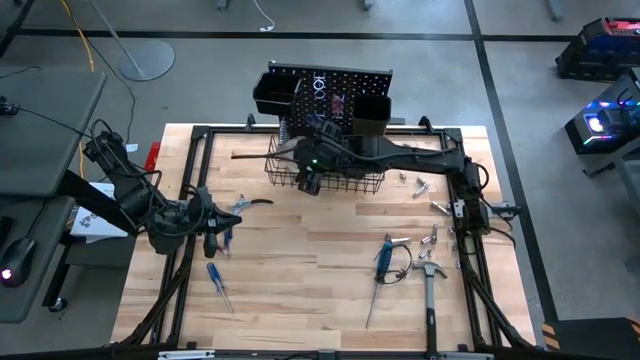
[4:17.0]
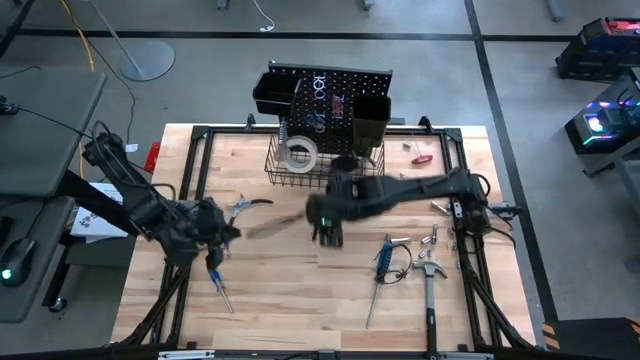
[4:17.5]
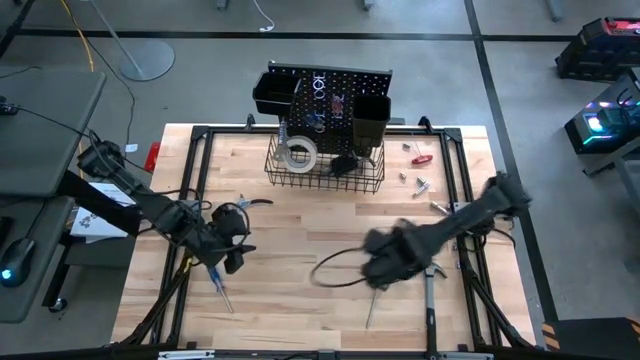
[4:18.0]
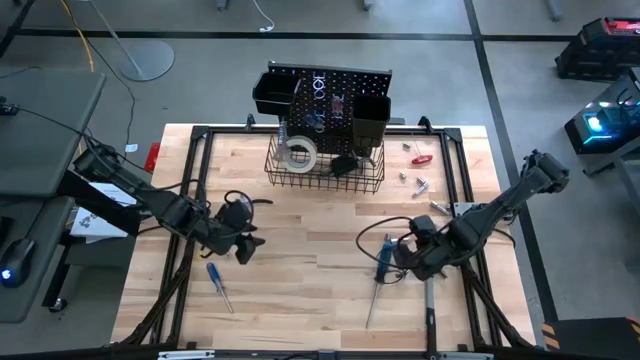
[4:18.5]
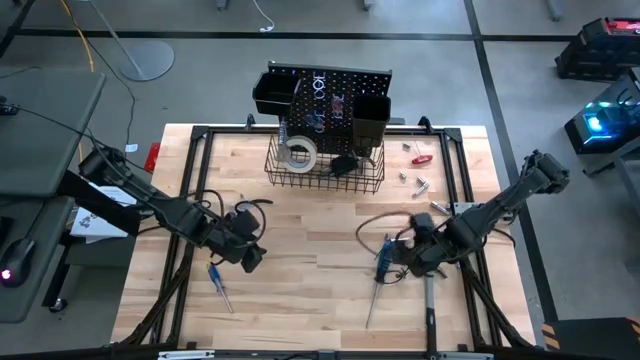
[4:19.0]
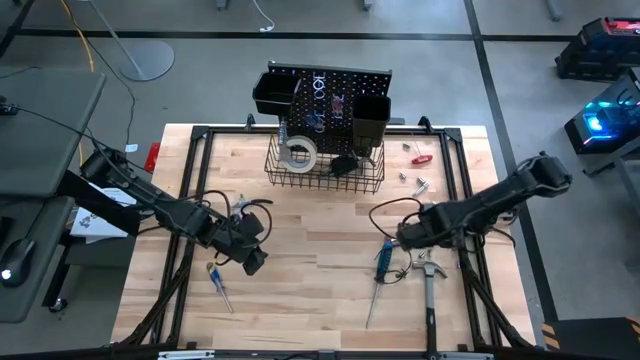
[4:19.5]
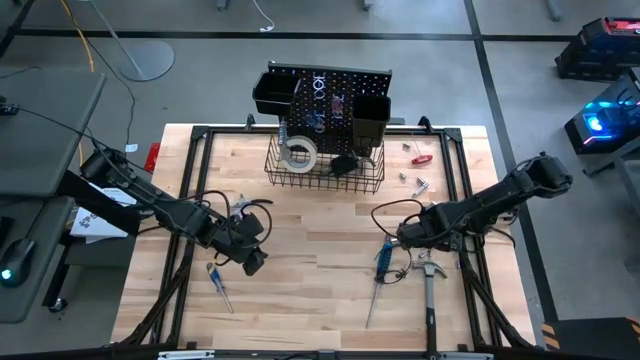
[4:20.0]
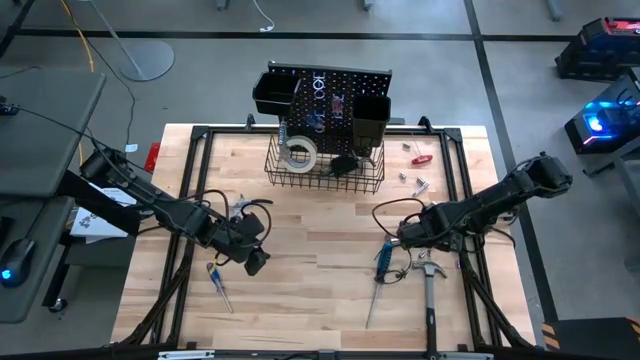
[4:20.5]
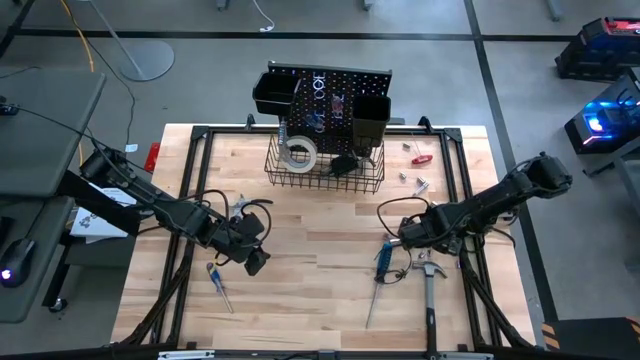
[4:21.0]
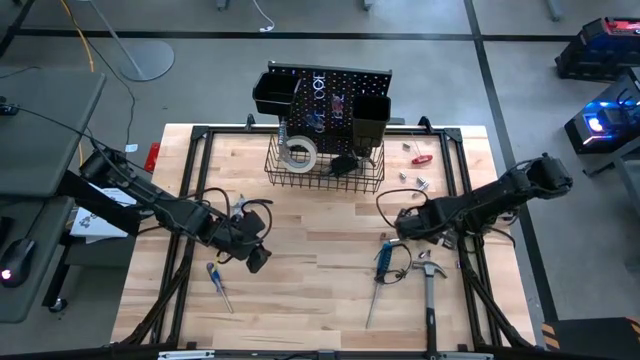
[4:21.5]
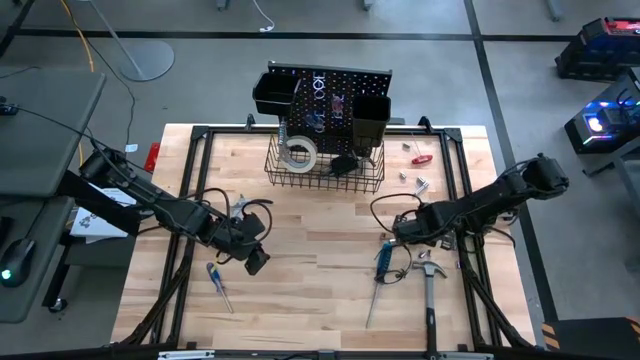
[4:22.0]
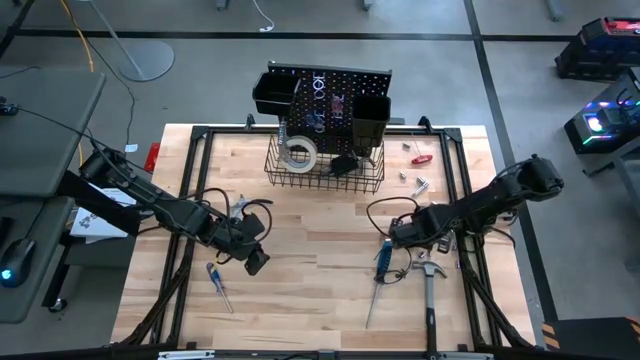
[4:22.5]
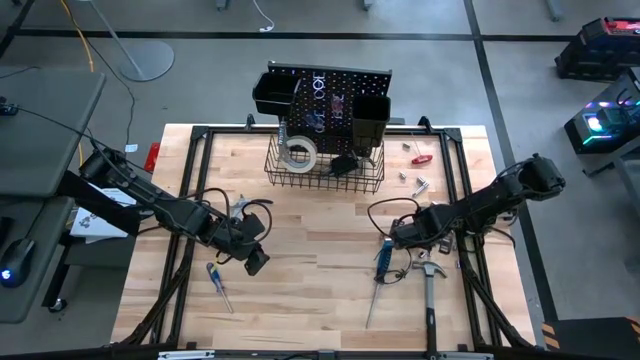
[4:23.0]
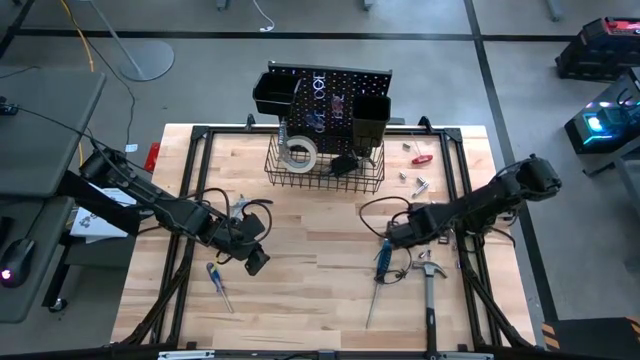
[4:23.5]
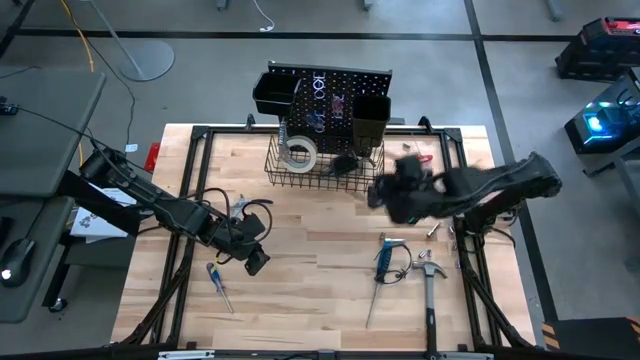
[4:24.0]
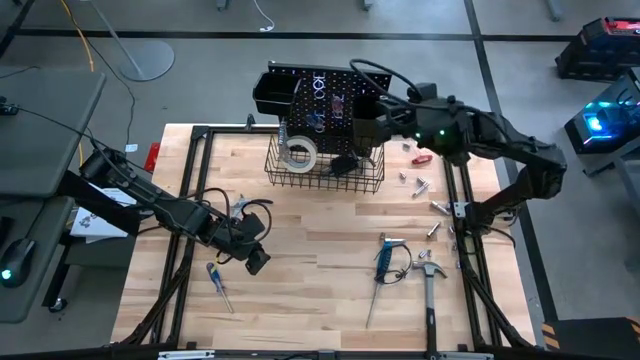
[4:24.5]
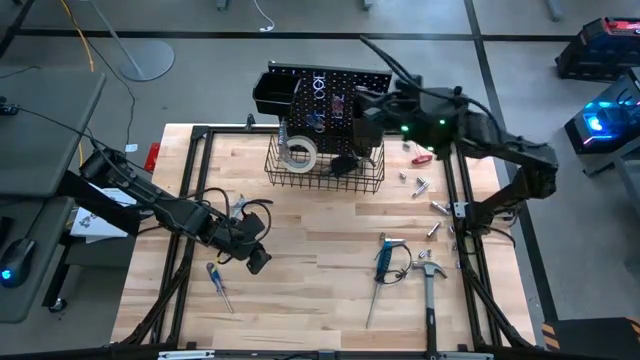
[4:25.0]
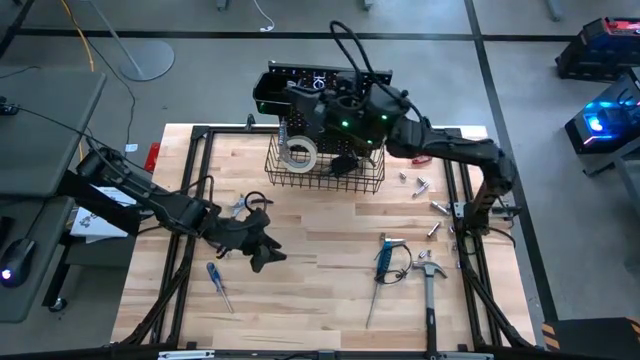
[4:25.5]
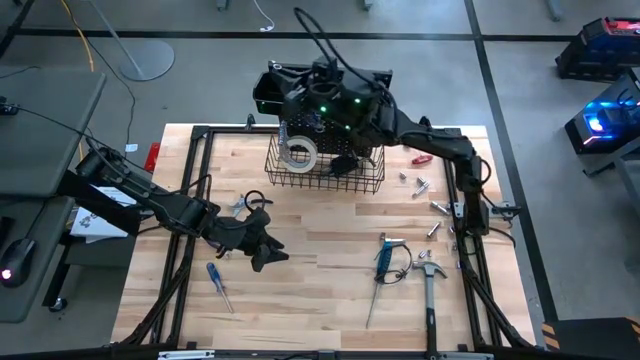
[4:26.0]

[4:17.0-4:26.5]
Task: Hang tools onto peg board
Put the socket in the left black bin on the pegboard

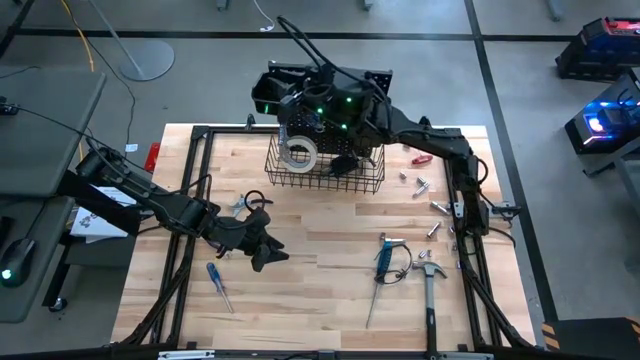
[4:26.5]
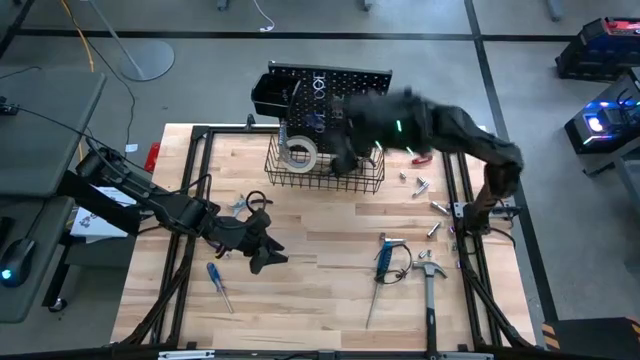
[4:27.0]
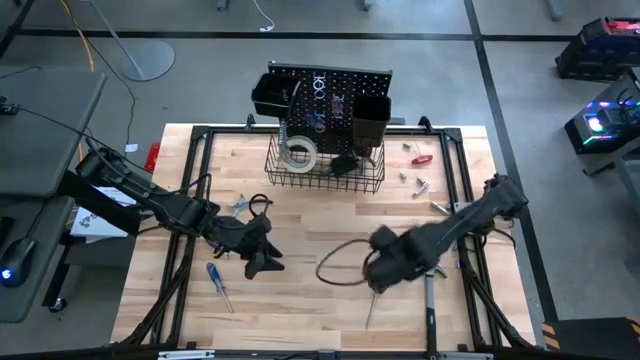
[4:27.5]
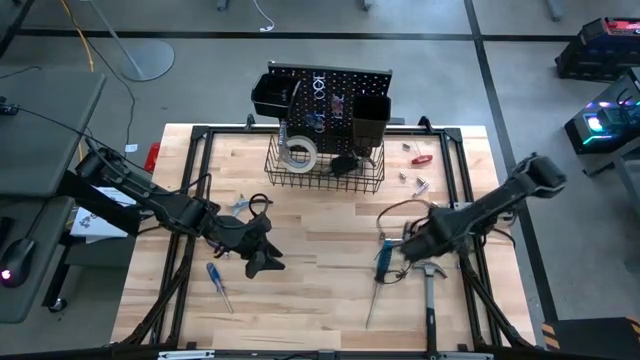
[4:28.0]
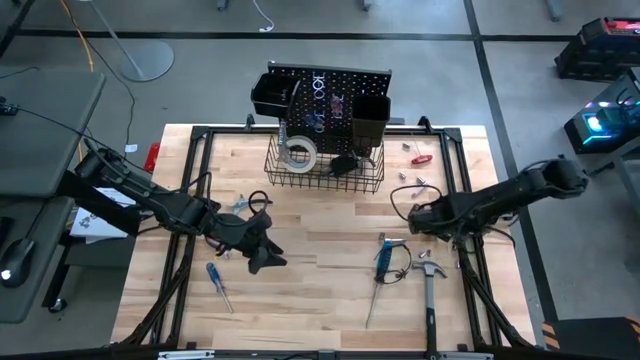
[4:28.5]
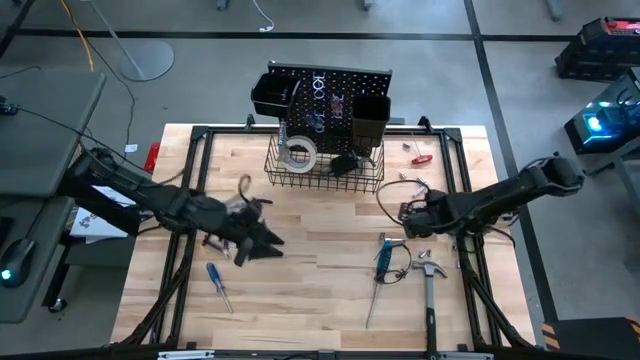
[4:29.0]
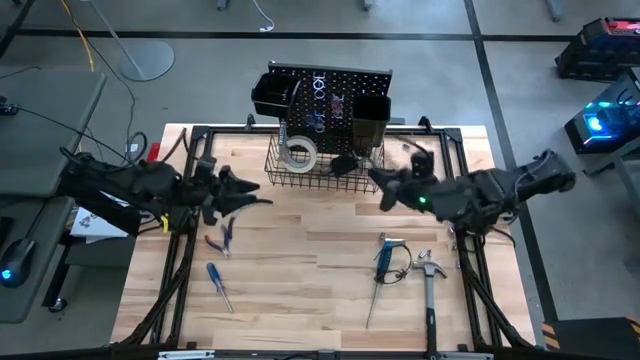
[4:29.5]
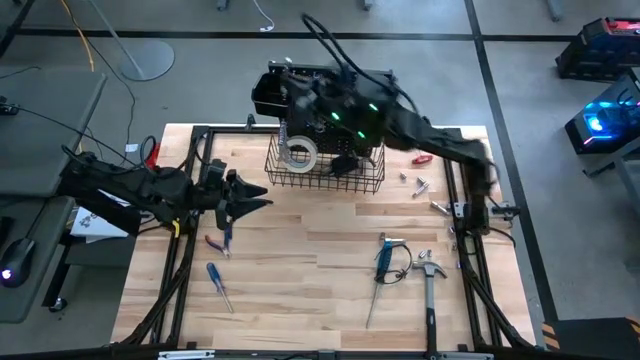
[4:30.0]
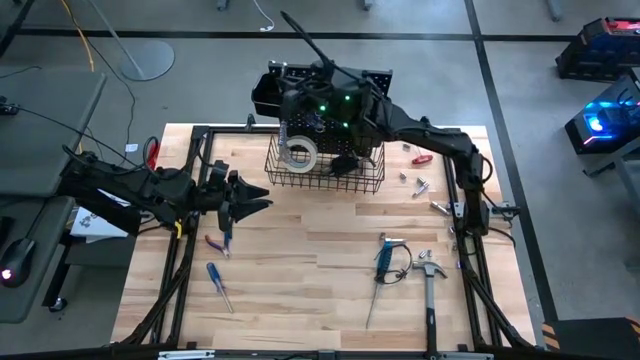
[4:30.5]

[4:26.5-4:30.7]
Put the extension bar in the left black bin on the pegboard

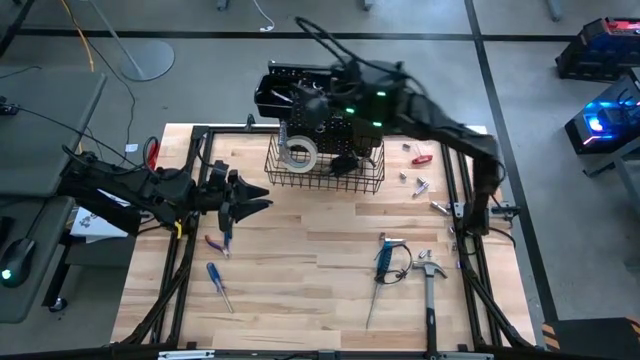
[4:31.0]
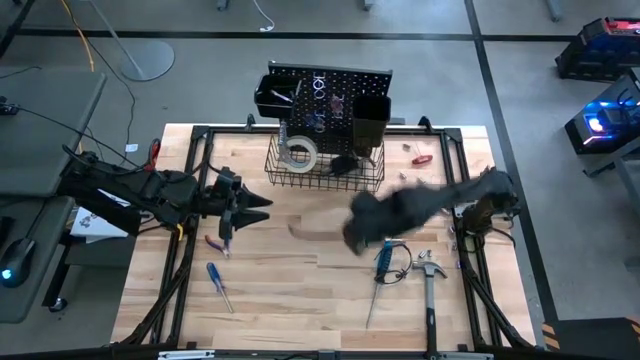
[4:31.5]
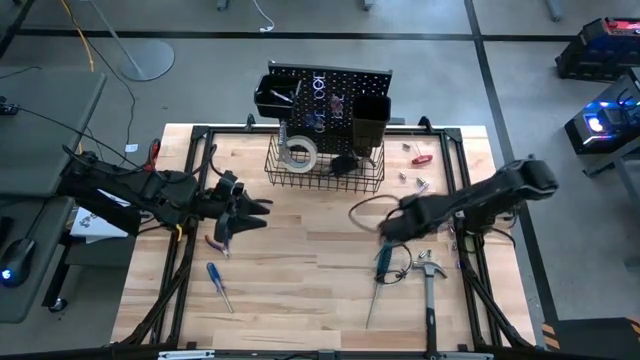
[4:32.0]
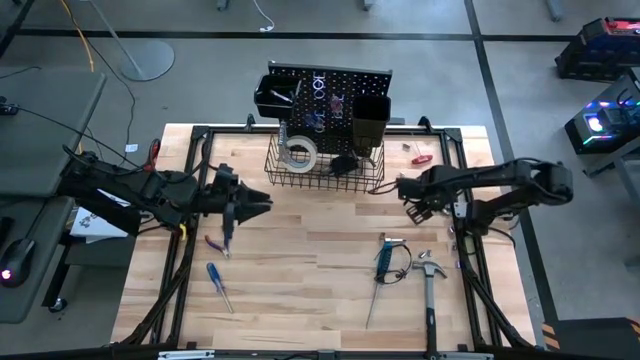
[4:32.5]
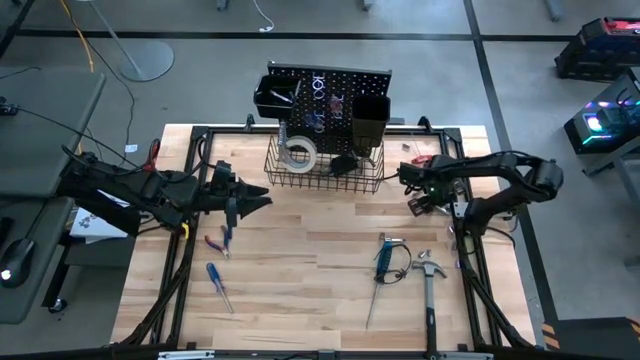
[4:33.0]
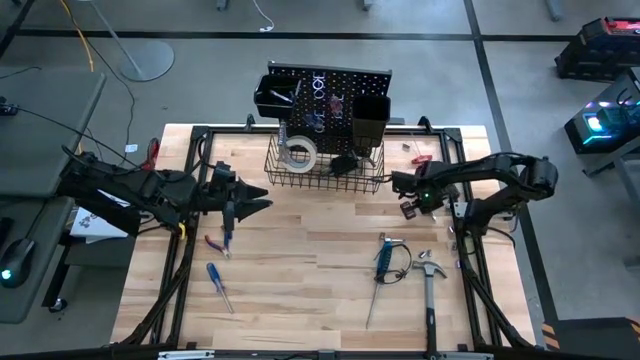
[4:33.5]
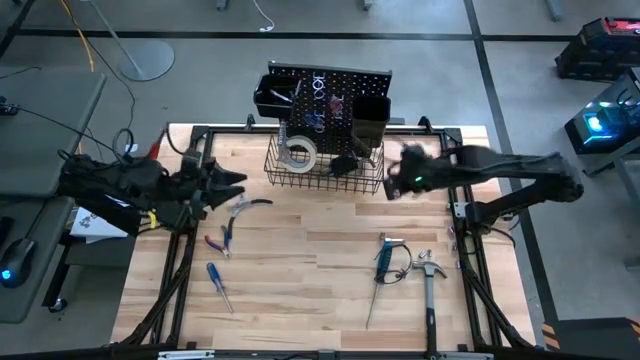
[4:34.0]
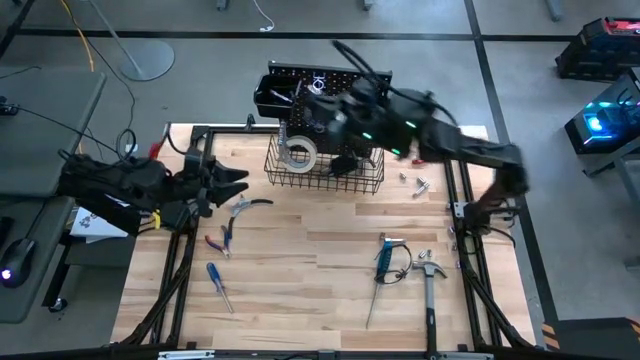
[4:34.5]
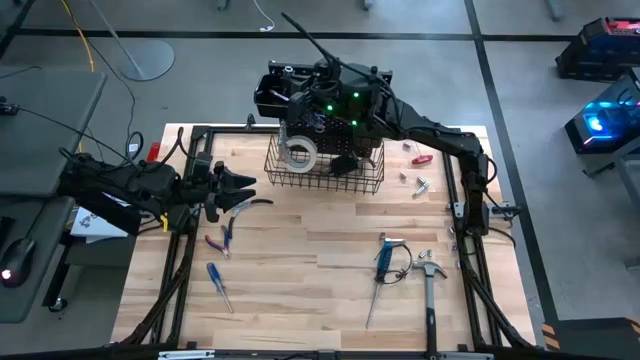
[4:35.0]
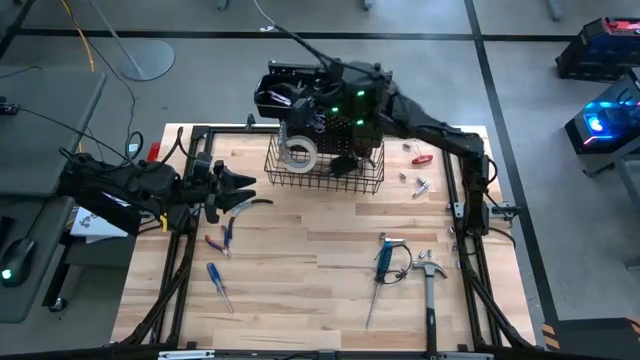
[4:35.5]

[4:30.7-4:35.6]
Put the extension bar in the left black bin on the pegboard

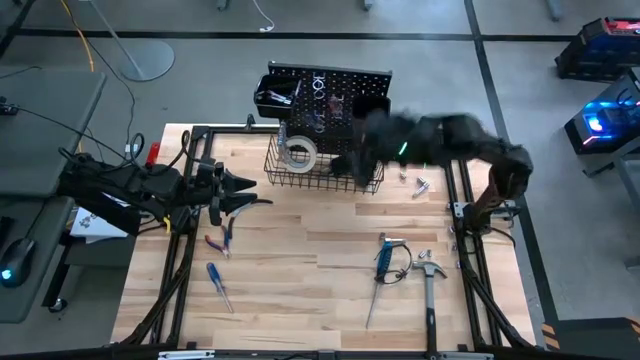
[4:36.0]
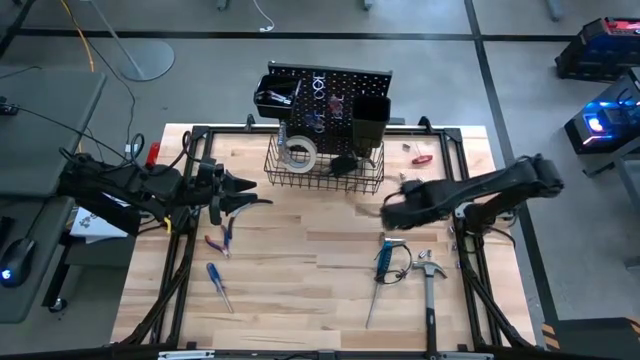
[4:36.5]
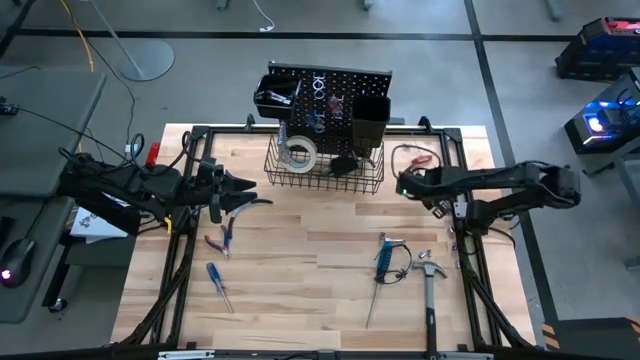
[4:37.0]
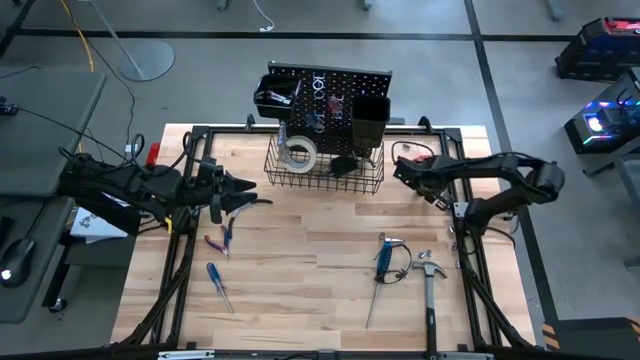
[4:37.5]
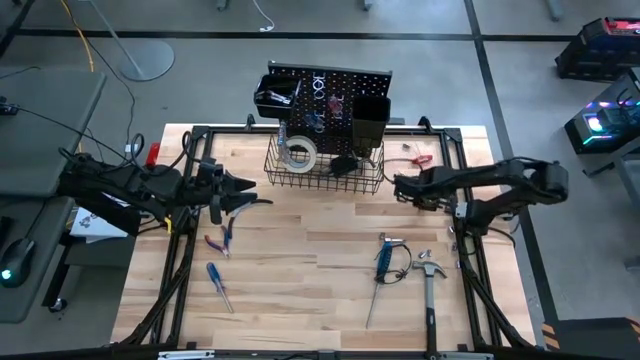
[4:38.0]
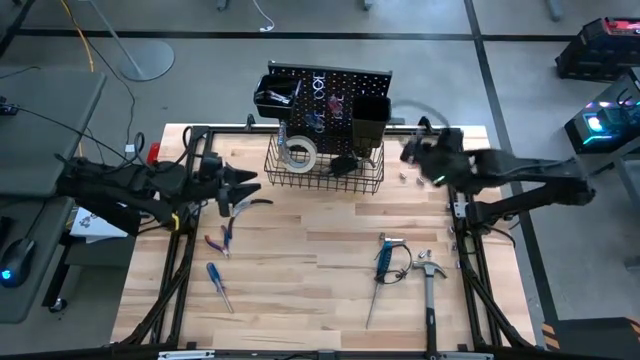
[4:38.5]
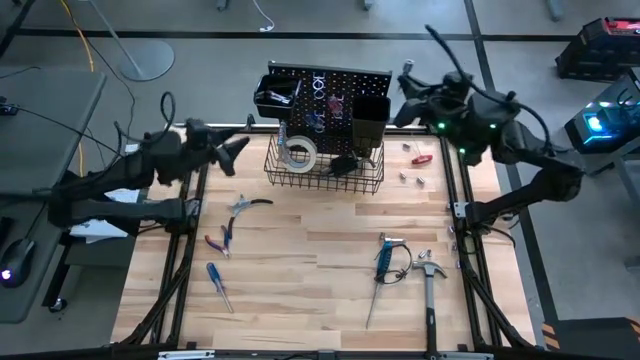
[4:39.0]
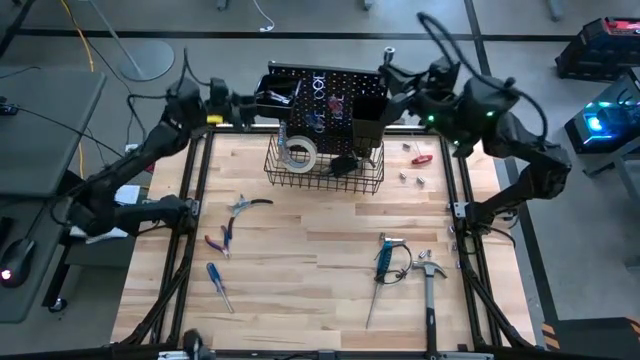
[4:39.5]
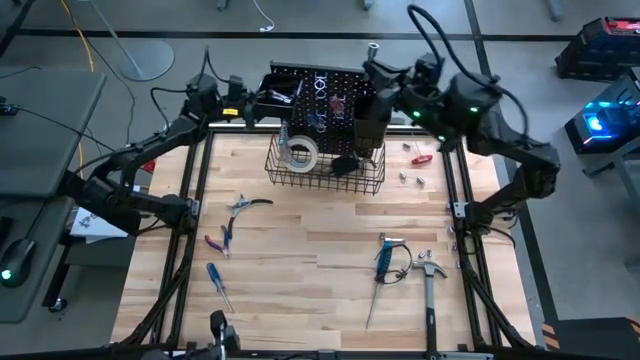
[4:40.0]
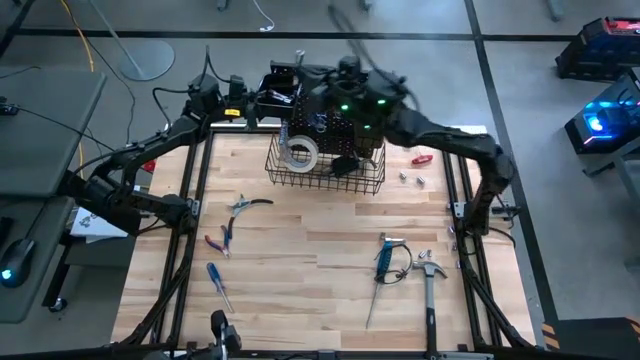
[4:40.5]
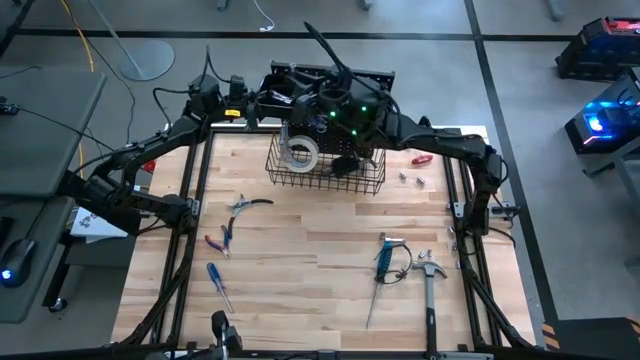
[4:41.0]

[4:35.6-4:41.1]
Put the extension bar in the left black bin on the pegboard
